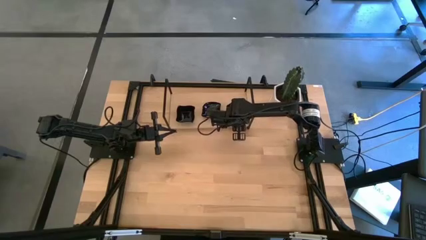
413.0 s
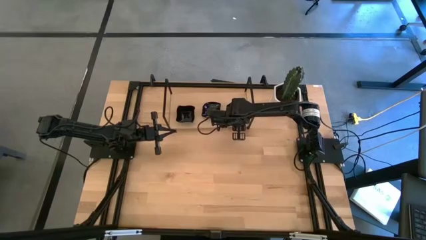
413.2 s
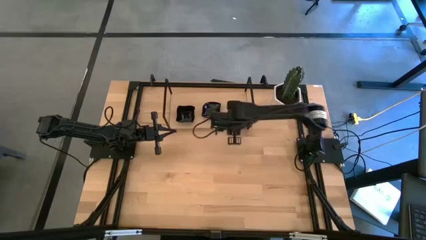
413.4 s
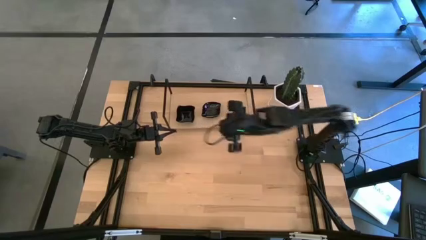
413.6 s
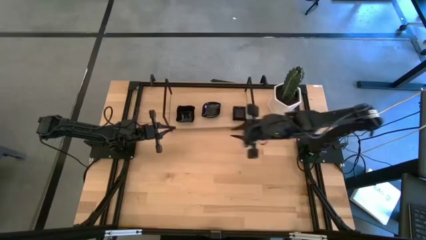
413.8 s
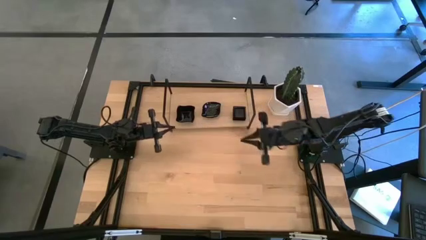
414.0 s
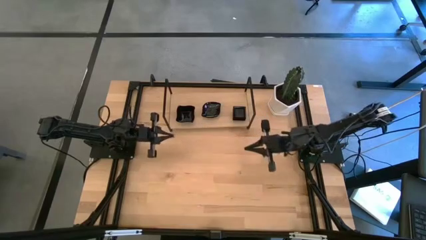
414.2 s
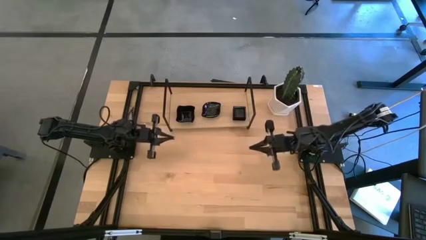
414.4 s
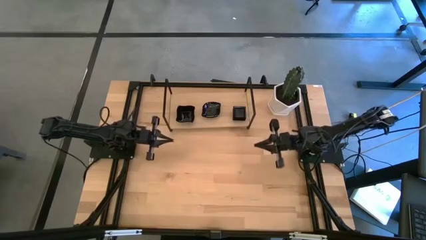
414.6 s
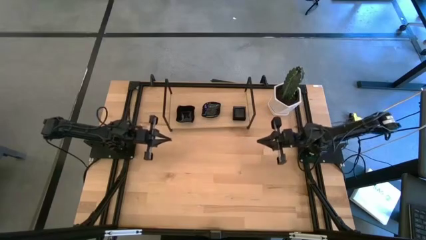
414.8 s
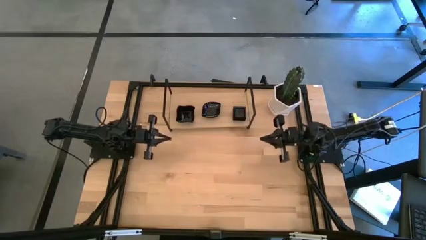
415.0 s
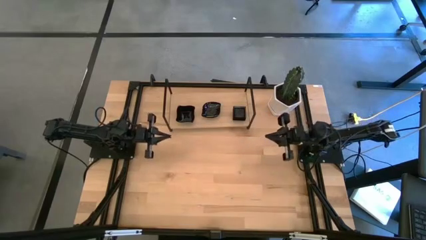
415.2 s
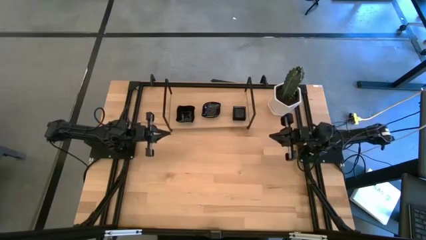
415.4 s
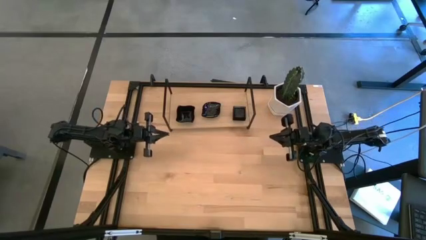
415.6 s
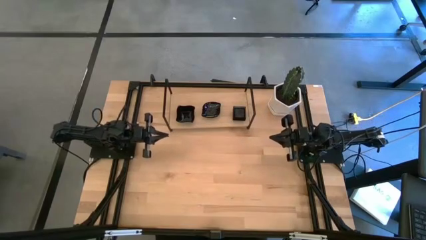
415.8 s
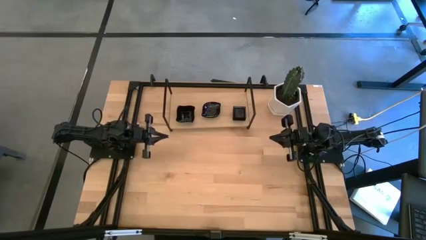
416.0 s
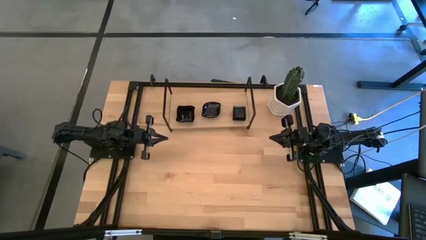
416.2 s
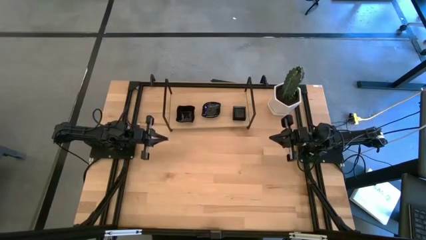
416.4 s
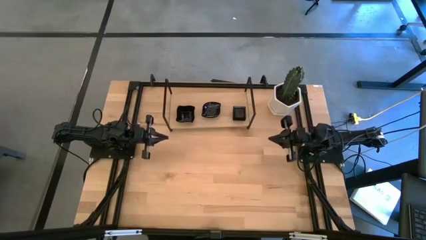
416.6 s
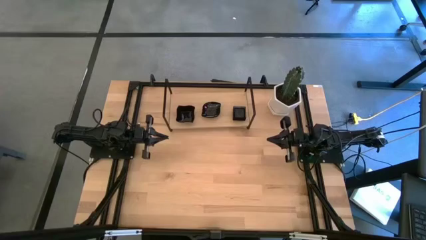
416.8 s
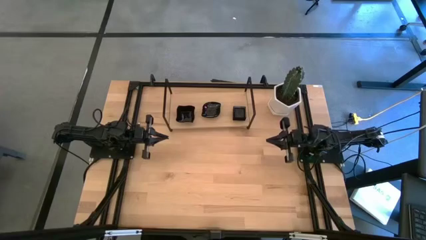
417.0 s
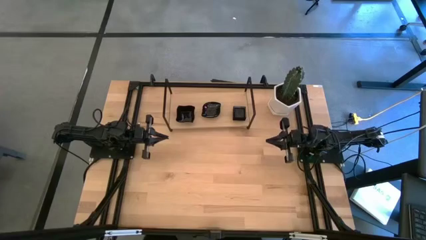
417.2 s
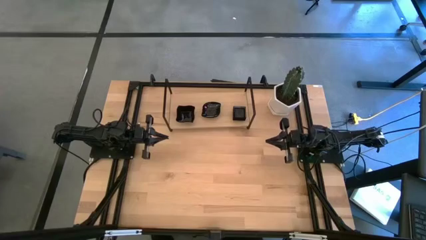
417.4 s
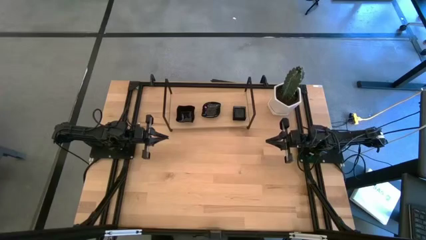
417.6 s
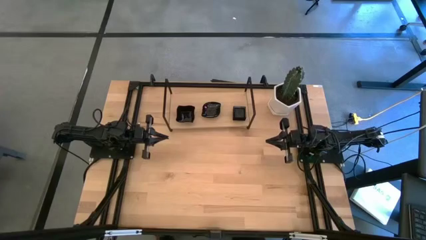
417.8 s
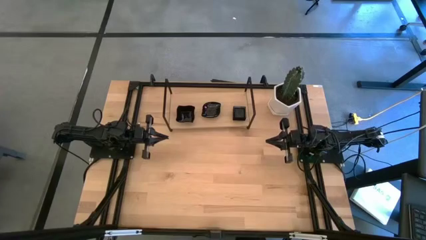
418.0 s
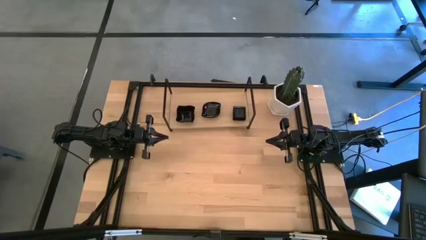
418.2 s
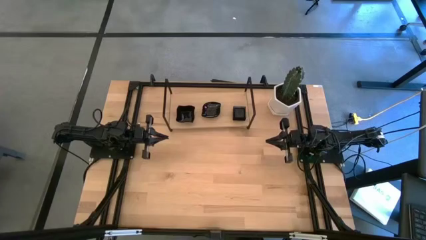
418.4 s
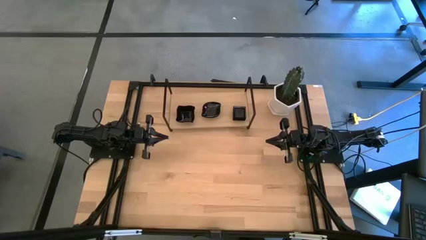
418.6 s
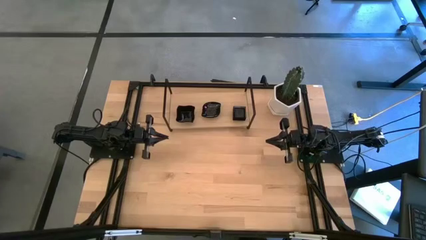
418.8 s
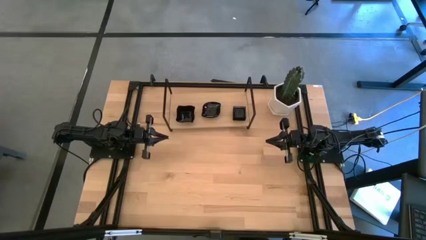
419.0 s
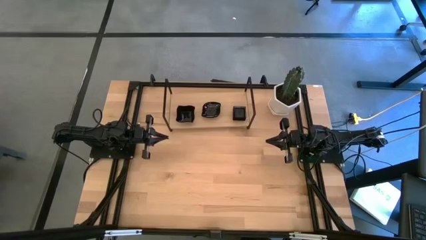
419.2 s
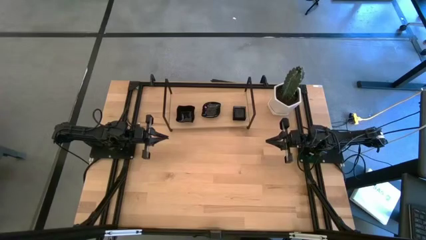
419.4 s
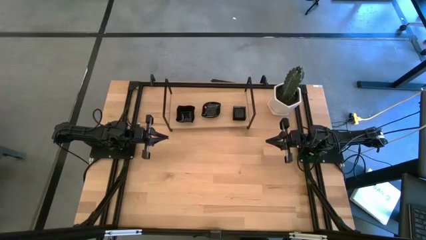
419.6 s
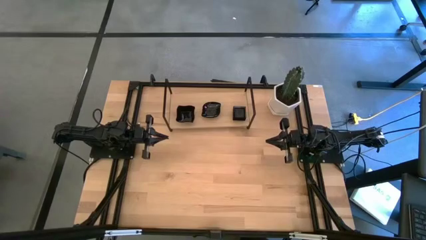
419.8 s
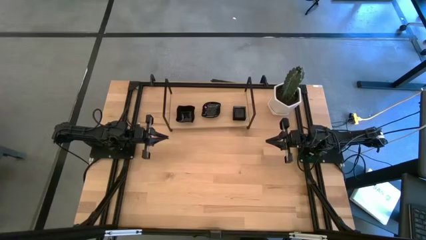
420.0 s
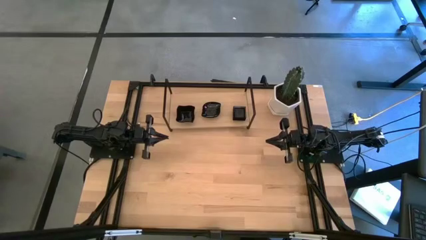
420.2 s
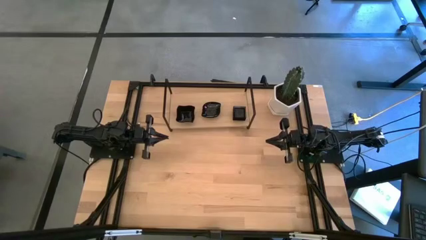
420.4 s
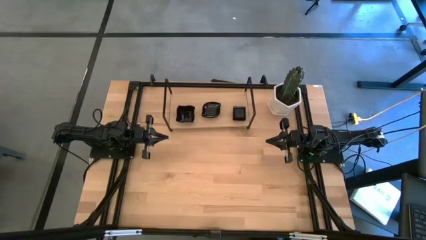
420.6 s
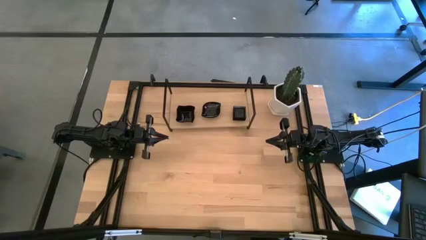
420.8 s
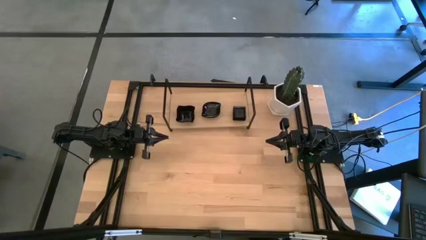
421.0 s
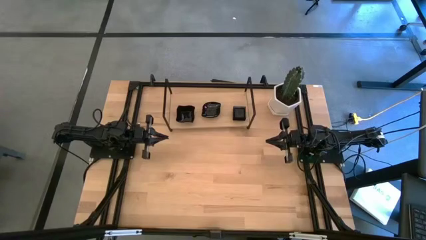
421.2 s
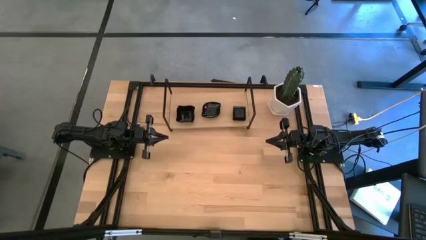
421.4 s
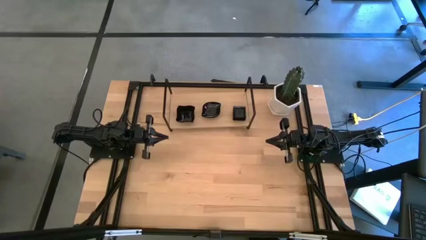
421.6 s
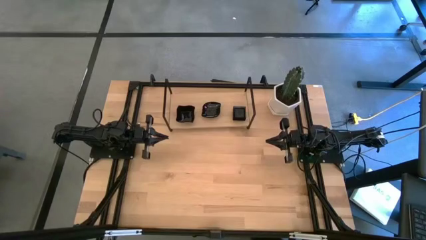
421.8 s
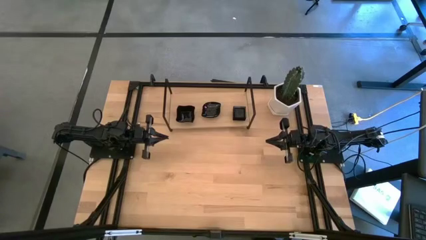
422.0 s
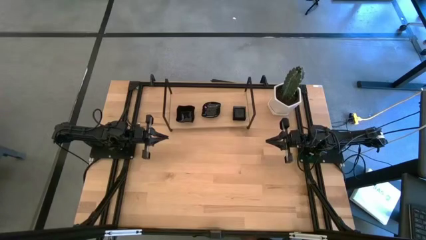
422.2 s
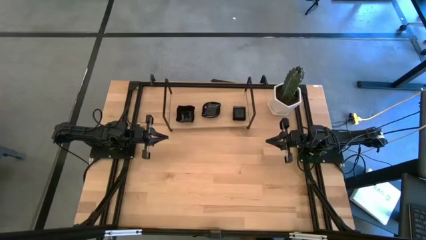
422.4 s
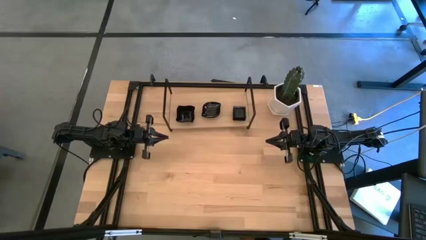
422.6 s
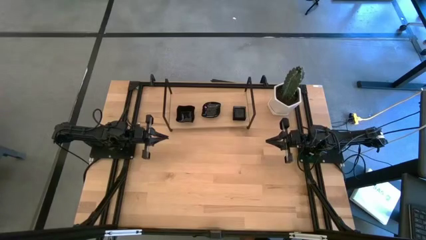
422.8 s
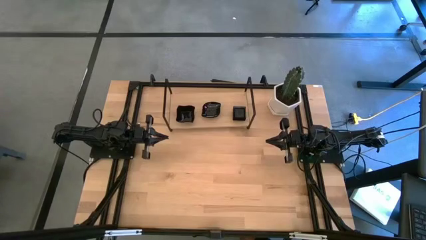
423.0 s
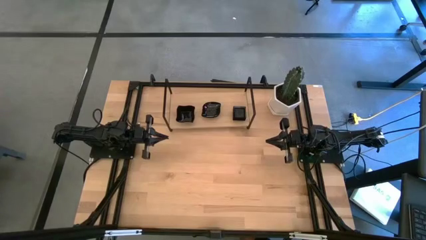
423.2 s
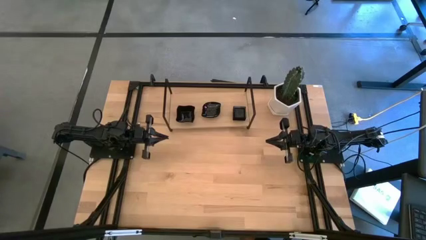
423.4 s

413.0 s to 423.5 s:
Task: Pick & Place Mini shaped plates
Return to Home Position

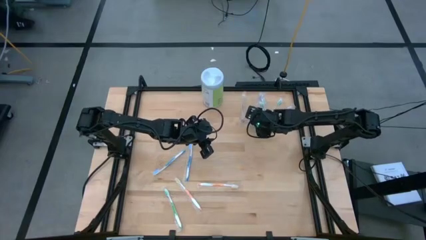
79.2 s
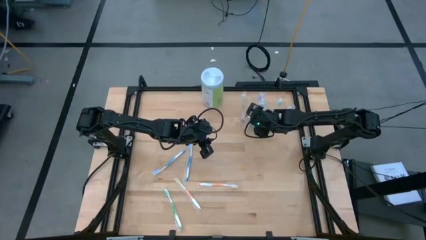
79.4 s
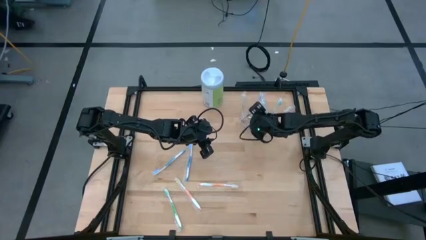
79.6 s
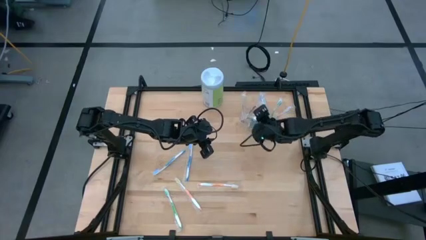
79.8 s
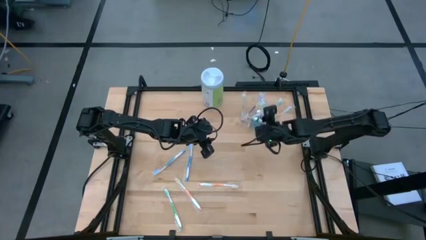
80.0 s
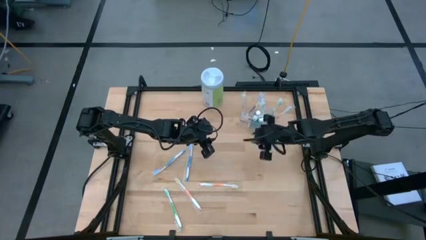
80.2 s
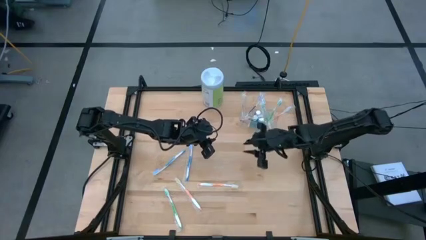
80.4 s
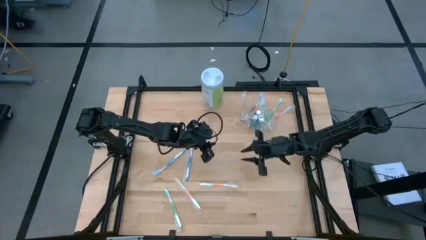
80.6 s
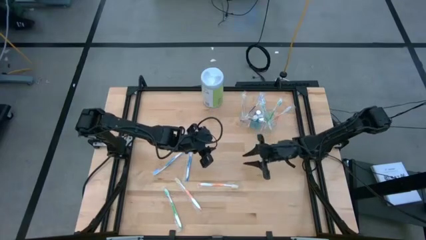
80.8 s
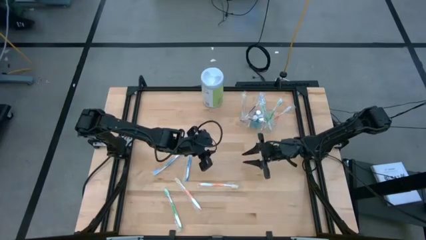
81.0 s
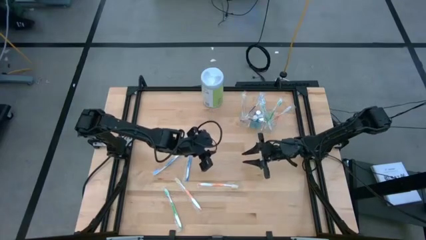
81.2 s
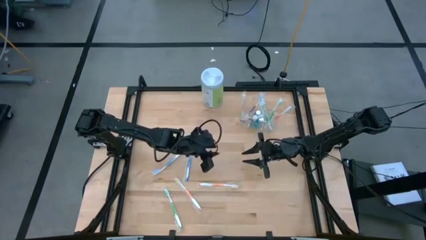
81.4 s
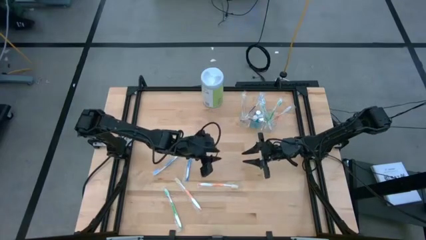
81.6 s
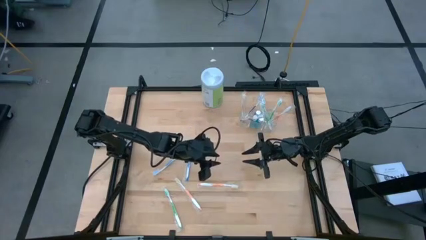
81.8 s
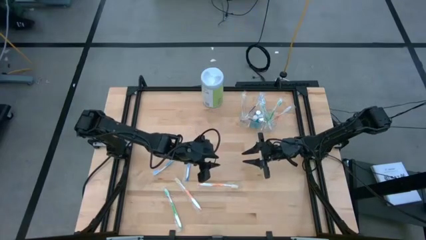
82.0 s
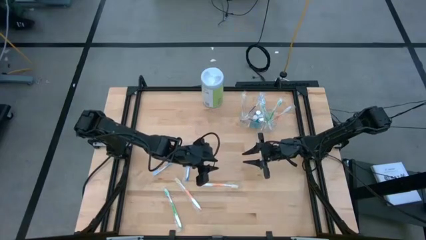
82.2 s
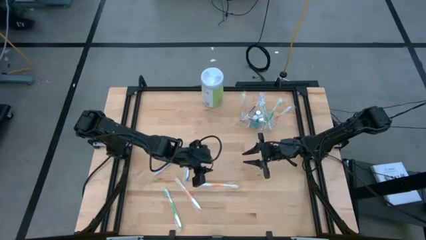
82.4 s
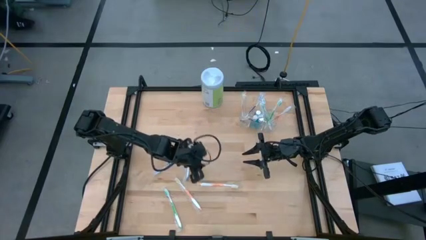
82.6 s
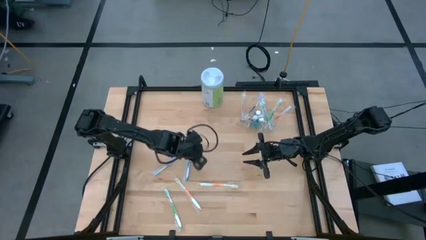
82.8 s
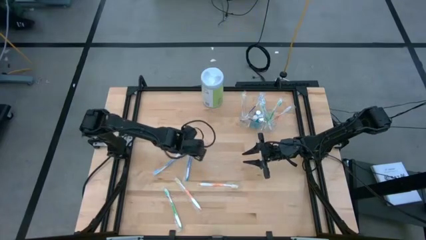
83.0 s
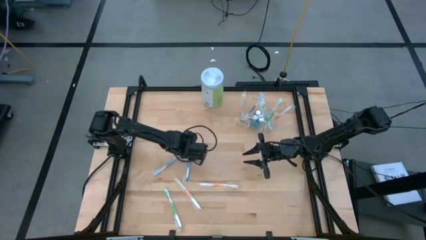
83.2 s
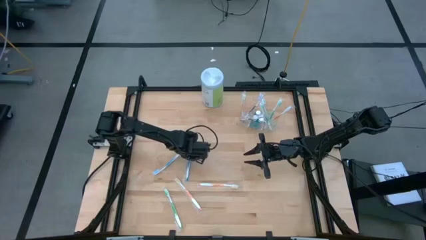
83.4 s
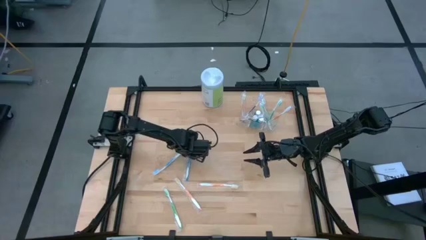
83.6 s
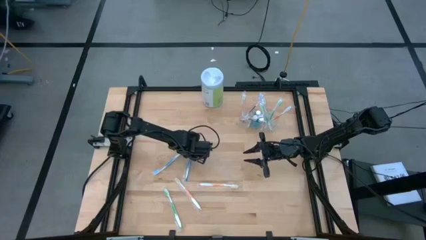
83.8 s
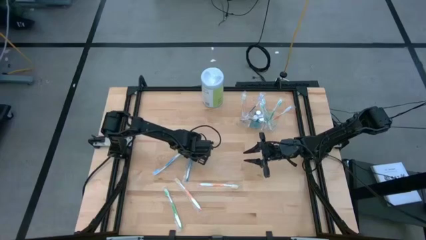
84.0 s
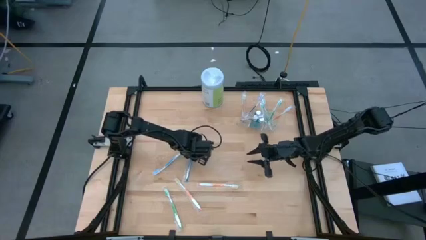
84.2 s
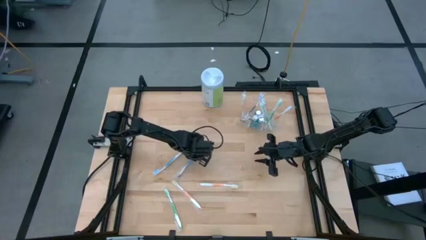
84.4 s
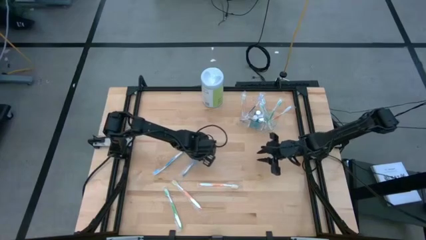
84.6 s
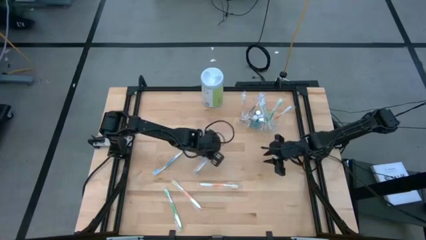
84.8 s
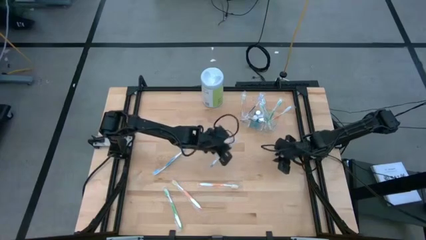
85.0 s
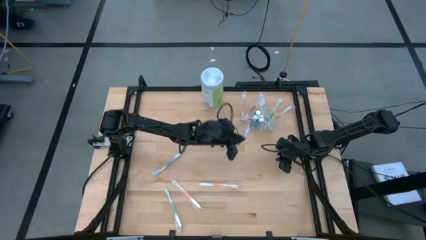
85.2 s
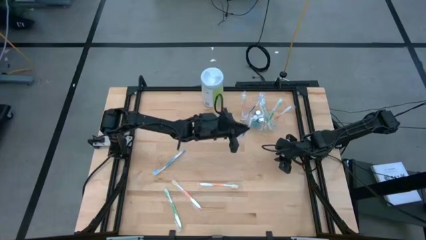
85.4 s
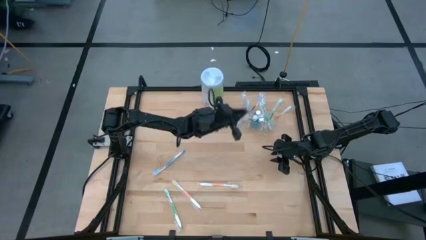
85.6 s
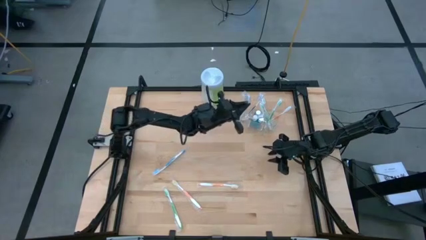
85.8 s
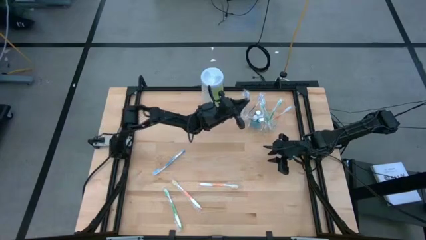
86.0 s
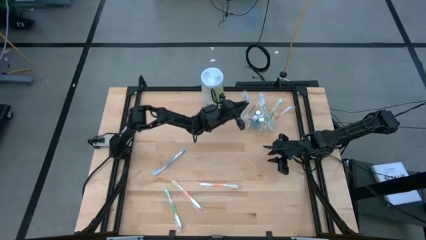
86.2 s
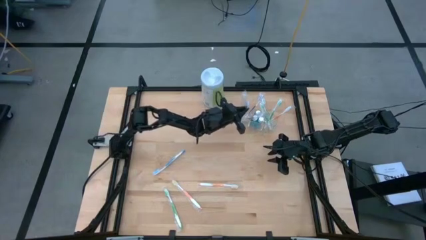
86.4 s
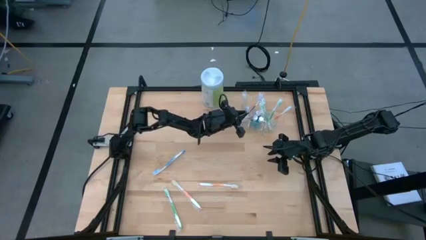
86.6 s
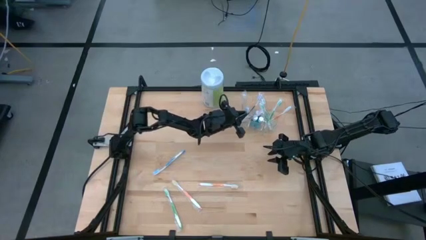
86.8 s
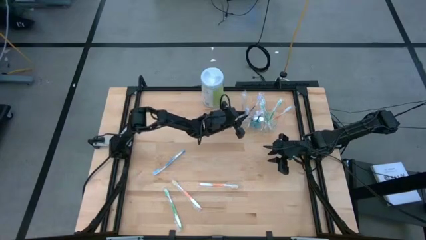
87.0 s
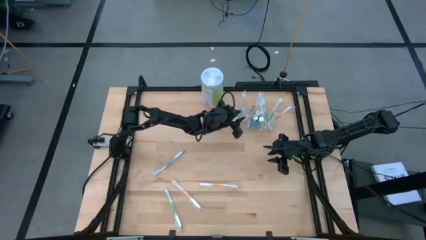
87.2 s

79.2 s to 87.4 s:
Task: Pick & Place toothbrushing station
Put the blue toothbrush into the transparent organizer
